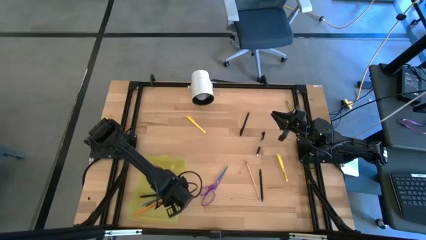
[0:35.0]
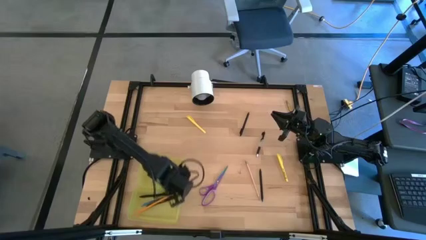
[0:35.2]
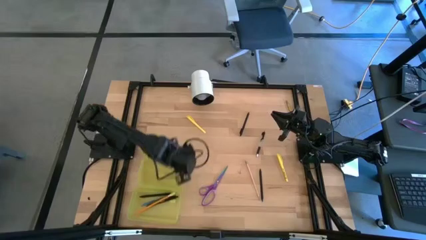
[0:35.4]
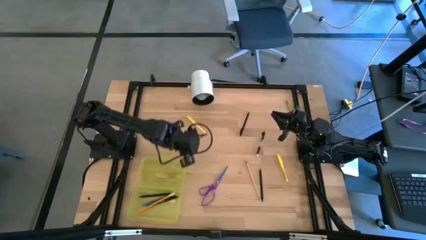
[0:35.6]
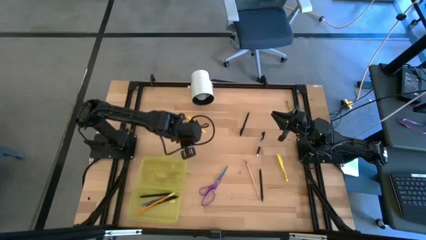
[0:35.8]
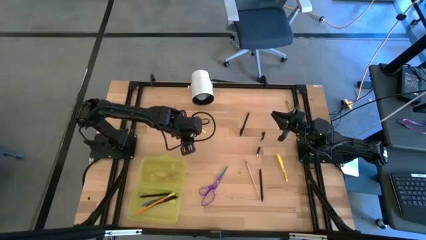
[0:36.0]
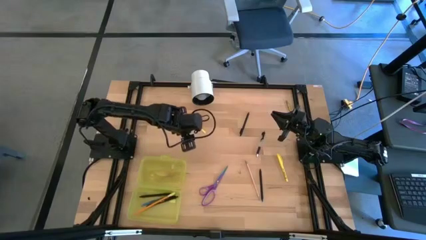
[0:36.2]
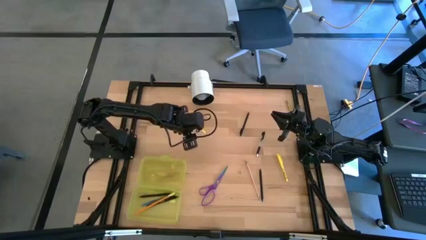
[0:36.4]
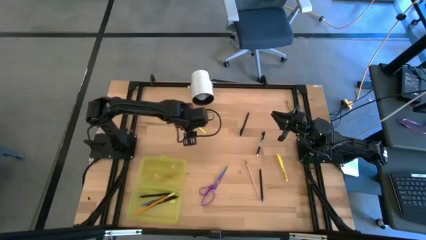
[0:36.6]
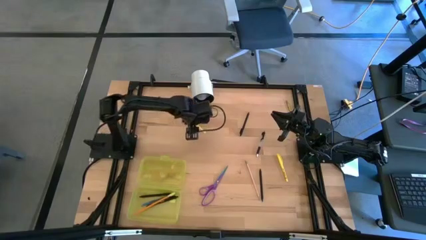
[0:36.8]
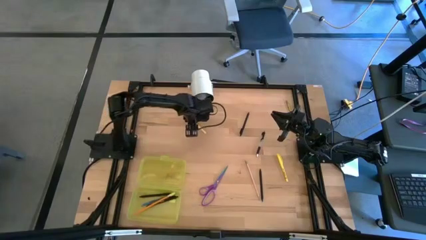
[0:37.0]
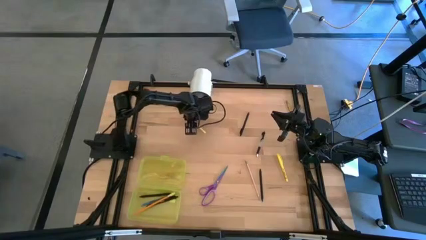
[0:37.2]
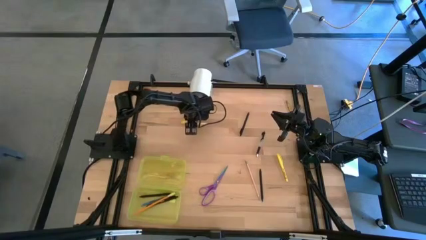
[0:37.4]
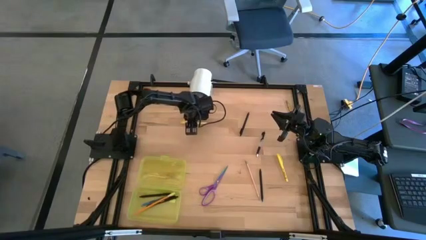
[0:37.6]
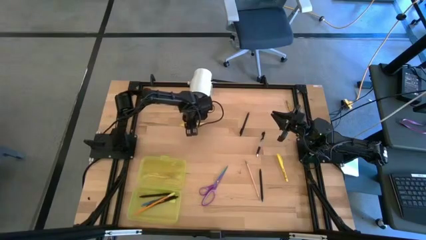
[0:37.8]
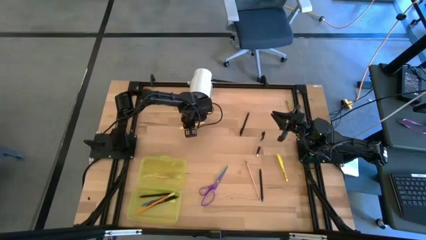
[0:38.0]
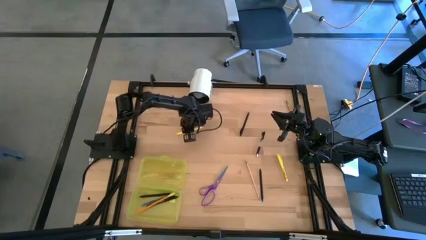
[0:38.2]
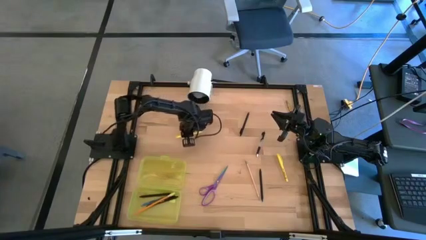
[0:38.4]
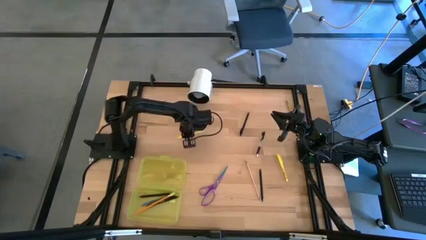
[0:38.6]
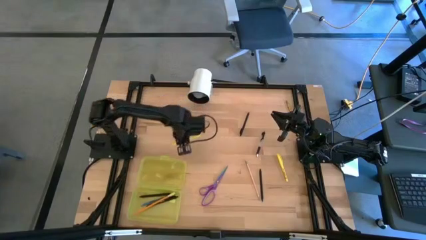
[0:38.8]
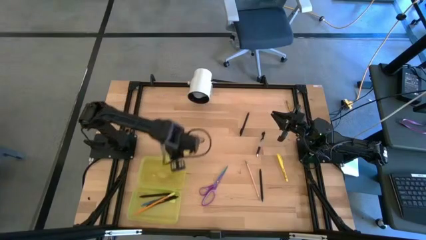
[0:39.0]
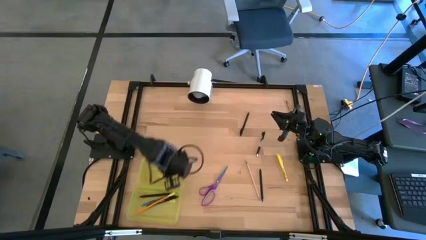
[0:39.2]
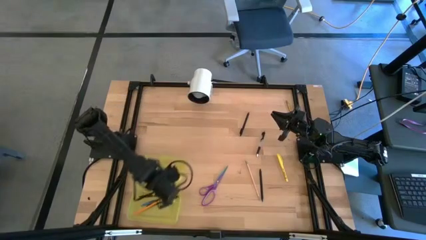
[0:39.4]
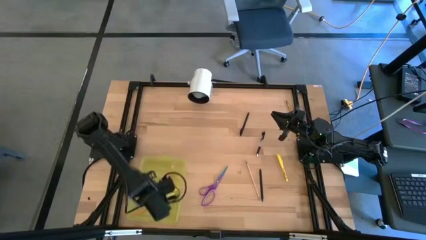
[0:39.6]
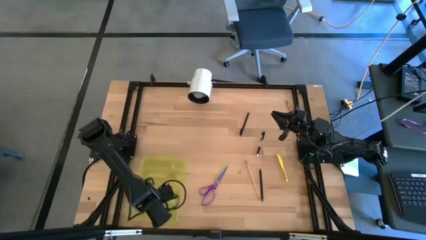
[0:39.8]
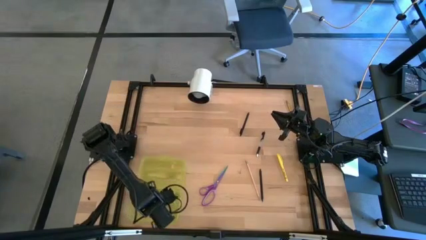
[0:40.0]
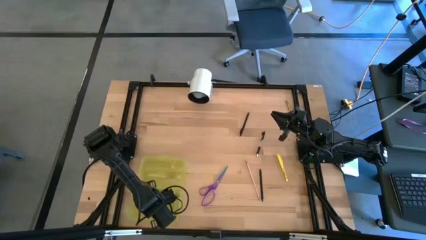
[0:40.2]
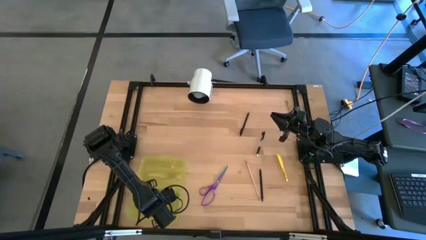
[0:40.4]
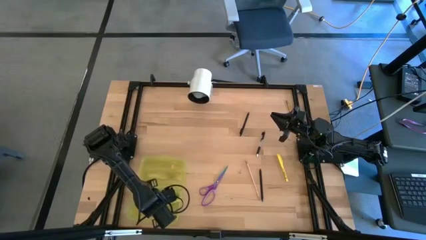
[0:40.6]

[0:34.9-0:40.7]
Task: Pick & place school supplies into a supply box
Put the yellow pen into the yellow supply box

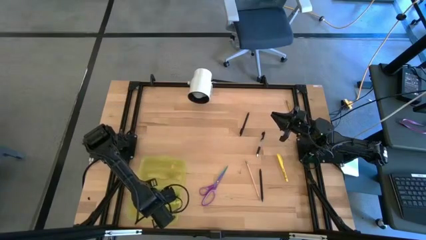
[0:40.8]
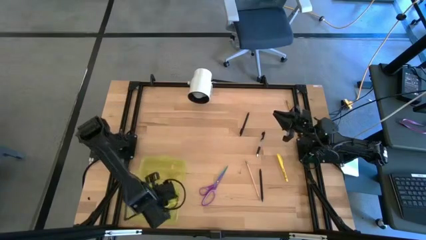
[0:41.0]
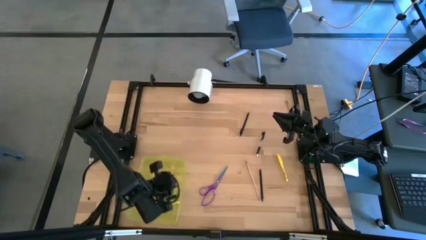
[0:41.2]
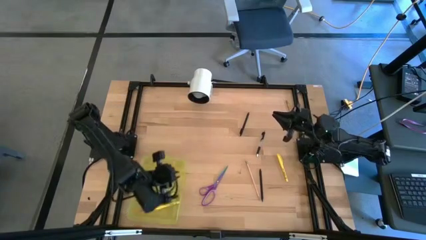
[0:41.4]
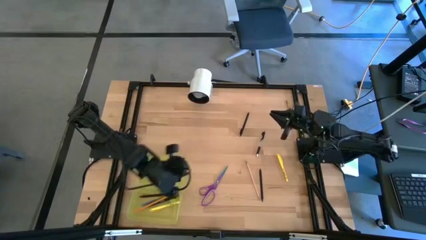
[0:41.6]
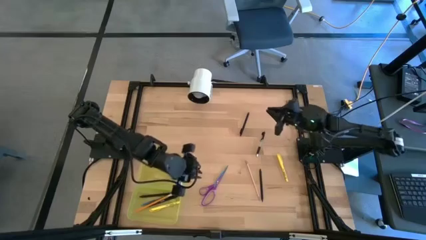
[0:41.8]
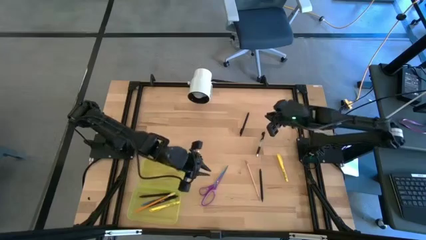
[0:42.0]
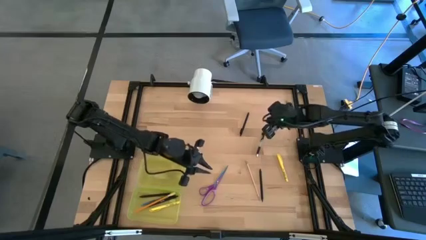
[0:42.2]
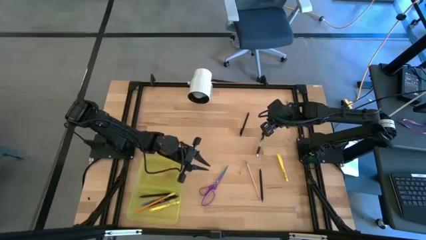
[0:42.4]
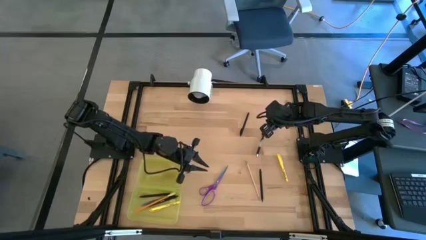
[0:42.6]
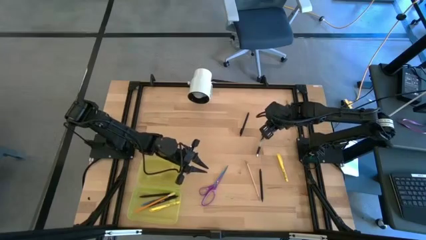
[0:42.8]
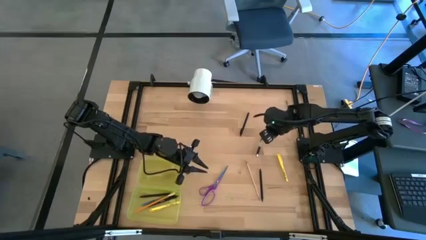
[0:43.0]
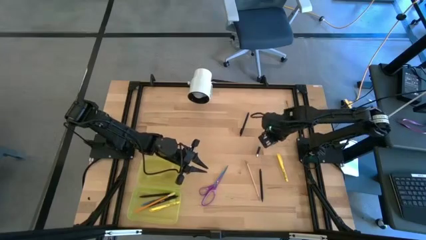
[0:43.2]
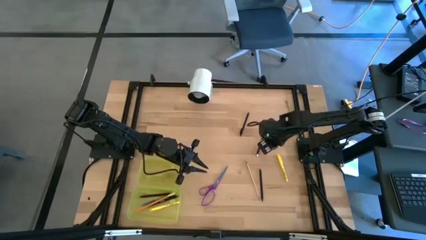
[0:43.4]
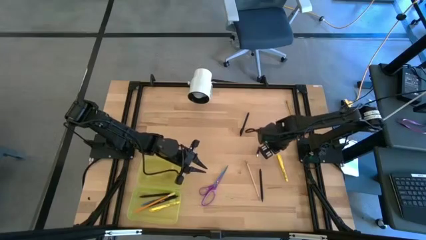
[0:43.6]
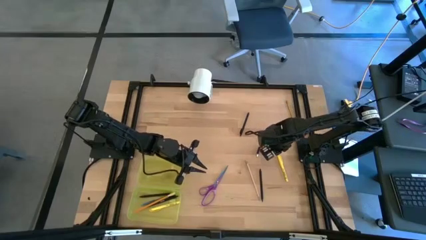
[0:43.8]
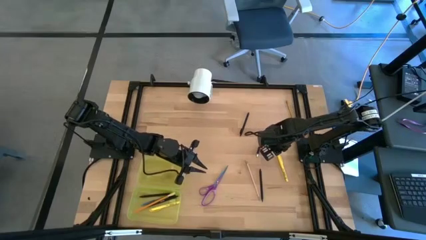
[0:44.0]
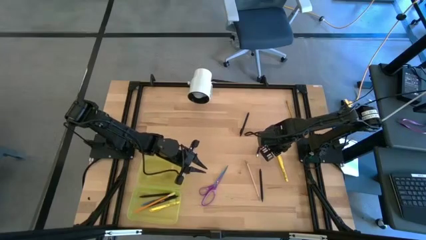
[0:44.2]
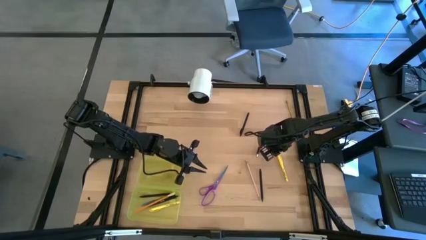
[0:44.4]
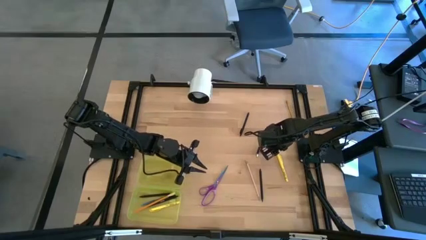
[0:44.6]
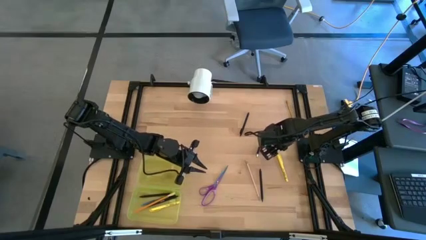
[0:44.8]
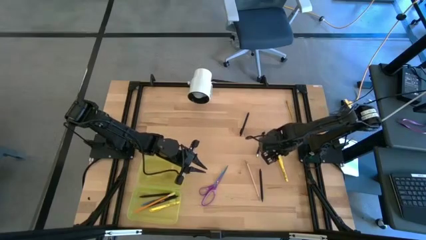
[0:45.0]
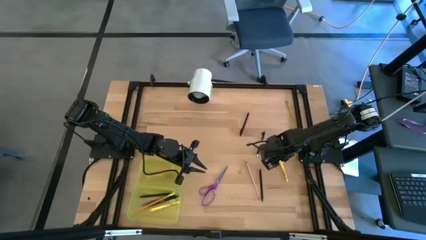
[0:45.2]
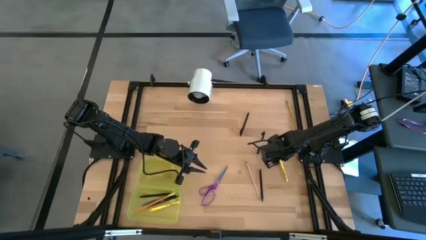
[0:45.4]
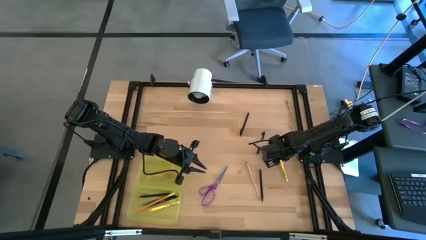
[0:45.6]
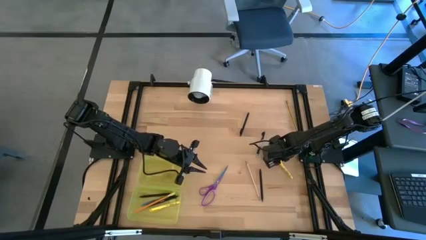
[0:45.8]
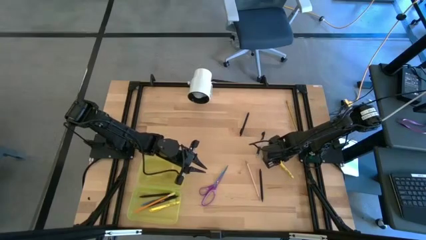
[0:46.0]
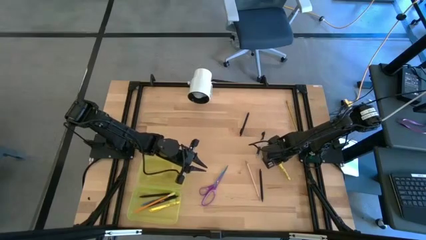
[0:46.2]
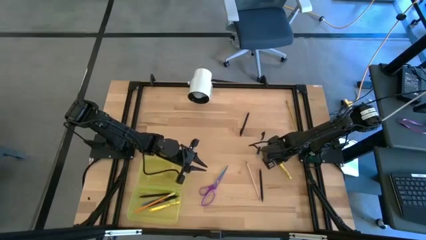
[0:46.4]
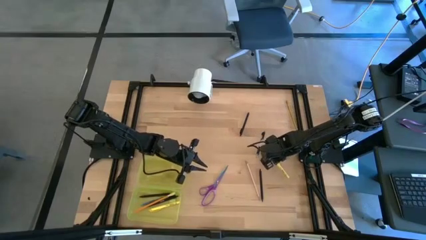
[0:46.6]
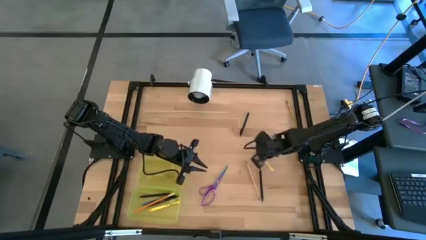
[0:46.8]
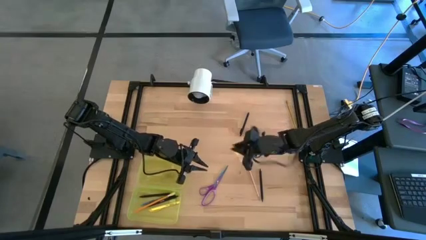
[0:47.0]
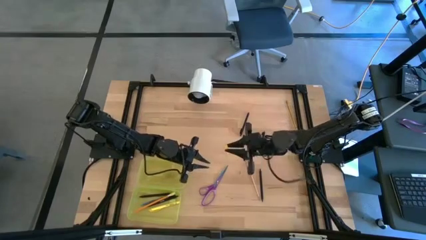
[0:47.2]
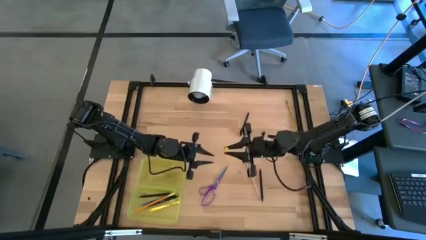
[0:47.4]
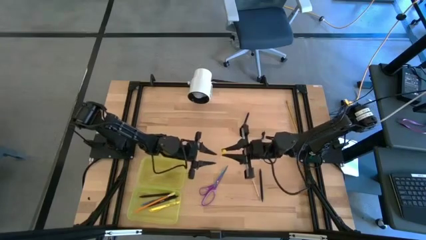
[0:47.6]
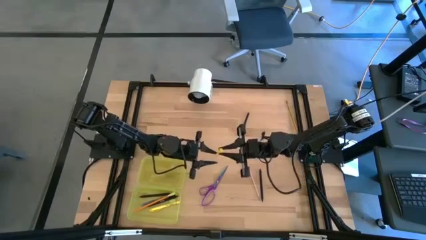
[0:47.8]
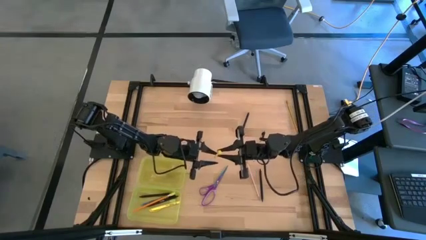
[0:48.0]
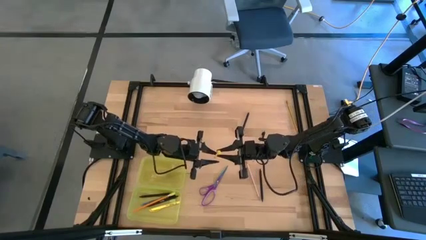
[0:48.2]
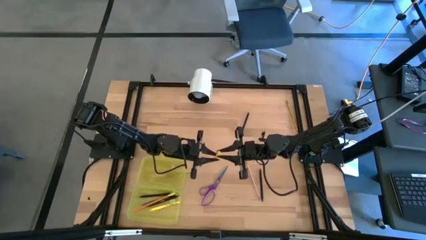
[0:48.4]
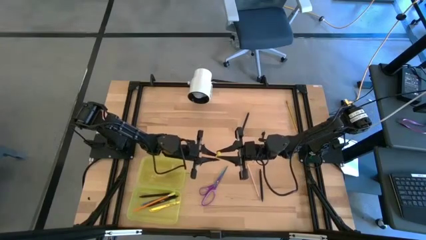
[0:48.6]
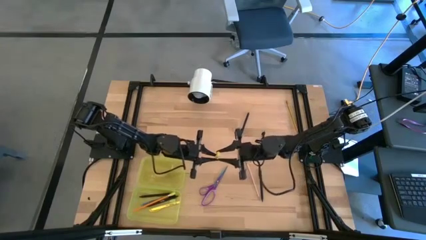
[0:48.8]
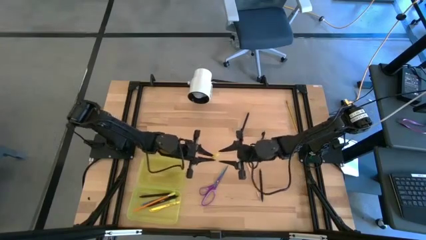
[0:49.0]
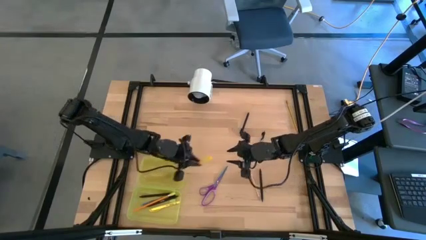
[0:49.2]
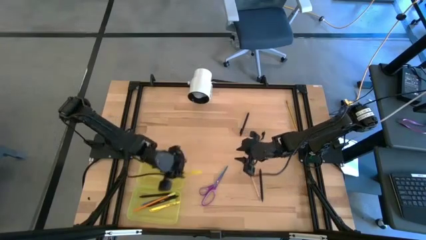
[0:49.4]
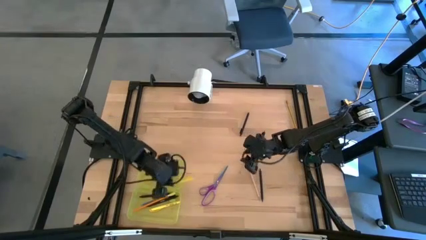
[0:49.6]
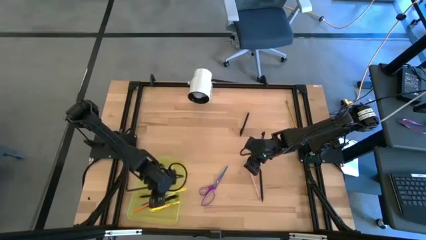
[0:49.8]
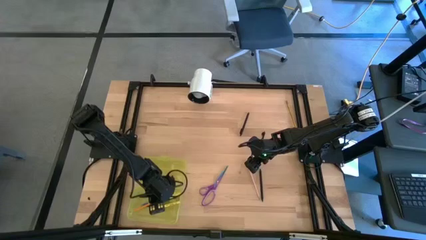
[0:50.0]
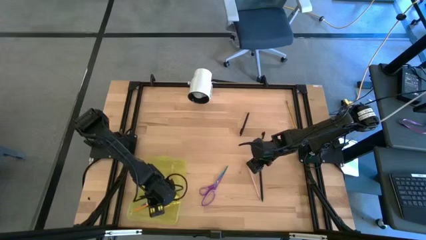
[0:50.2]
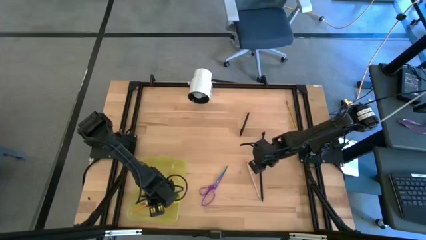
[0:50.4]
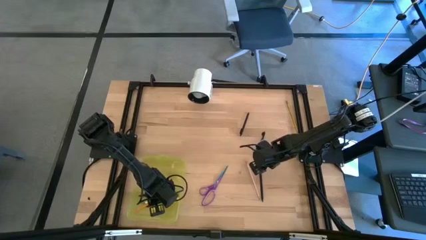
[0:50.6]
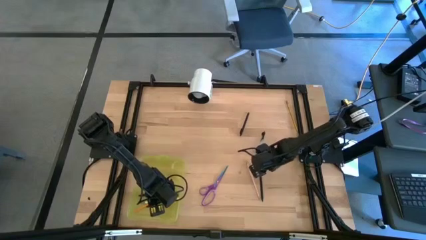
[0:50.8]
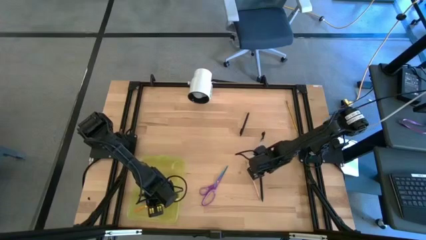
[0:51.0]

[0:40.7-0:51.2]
Put the yellow pen into the yellow supply box
